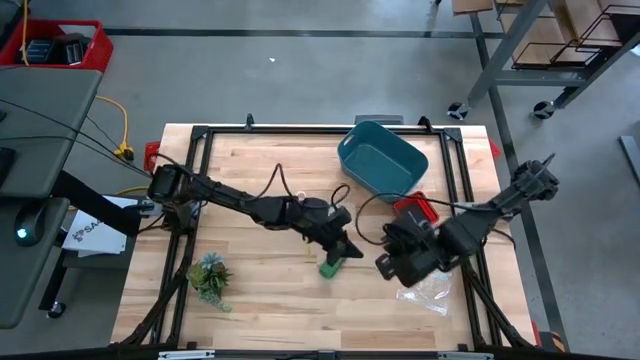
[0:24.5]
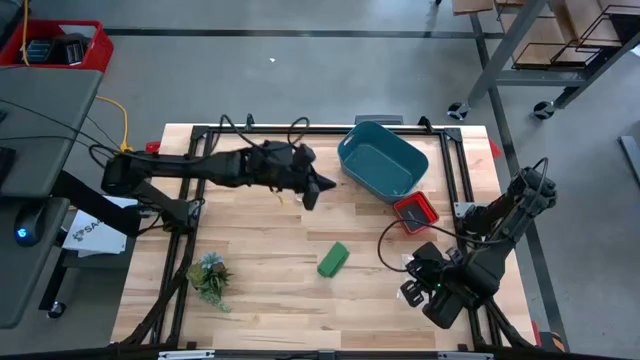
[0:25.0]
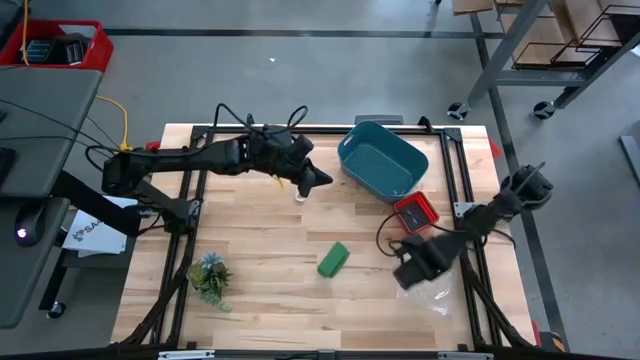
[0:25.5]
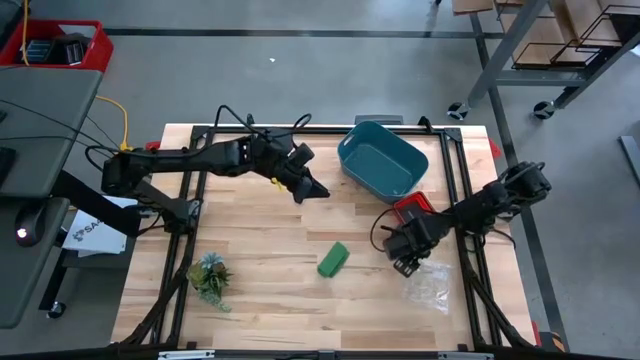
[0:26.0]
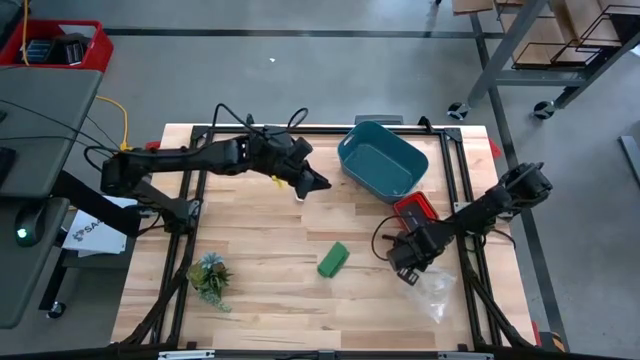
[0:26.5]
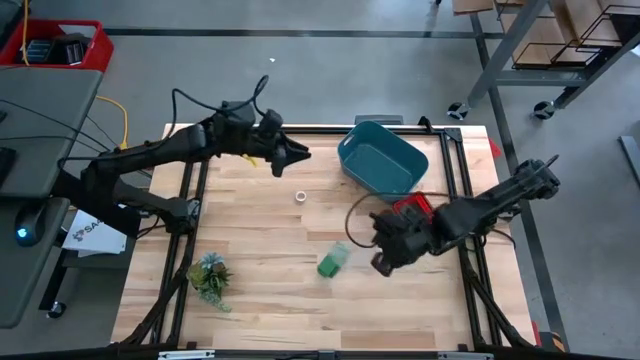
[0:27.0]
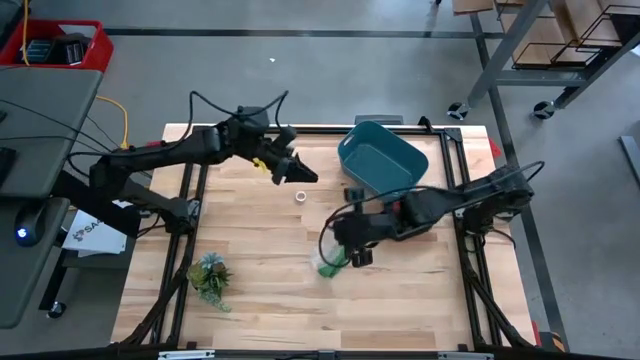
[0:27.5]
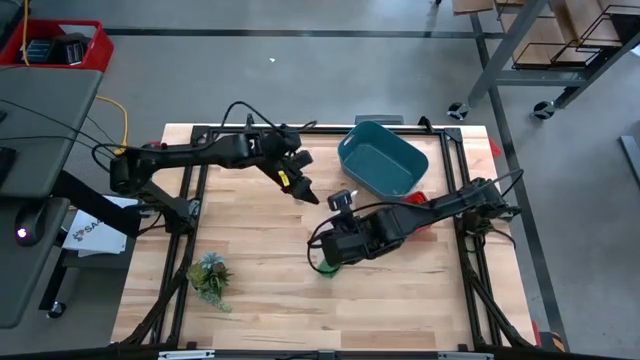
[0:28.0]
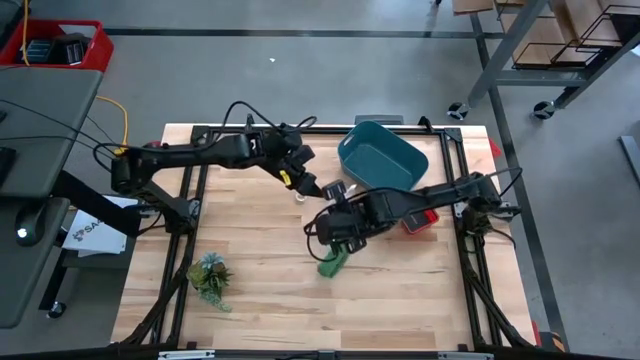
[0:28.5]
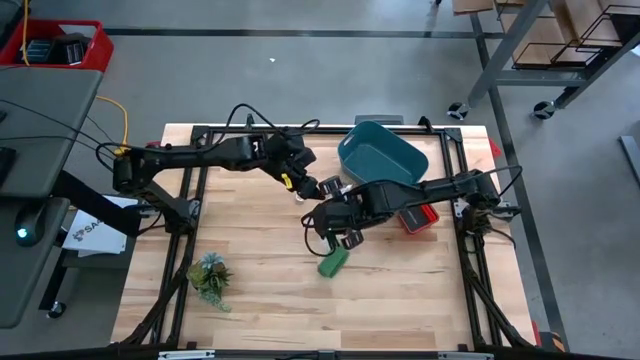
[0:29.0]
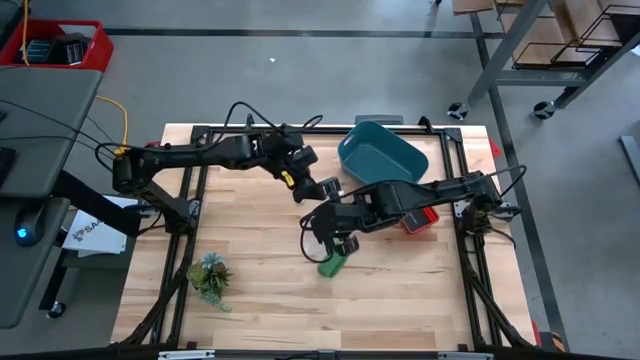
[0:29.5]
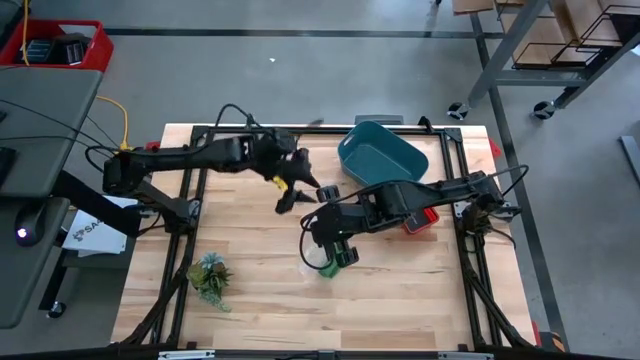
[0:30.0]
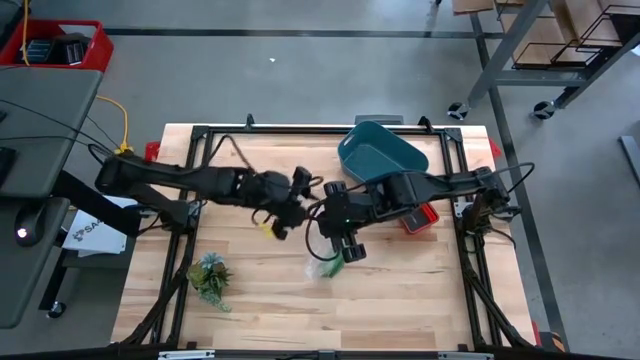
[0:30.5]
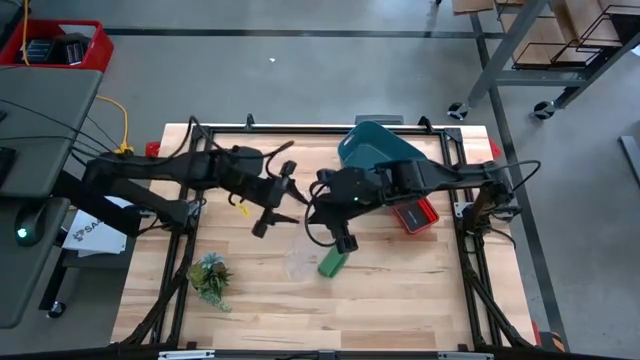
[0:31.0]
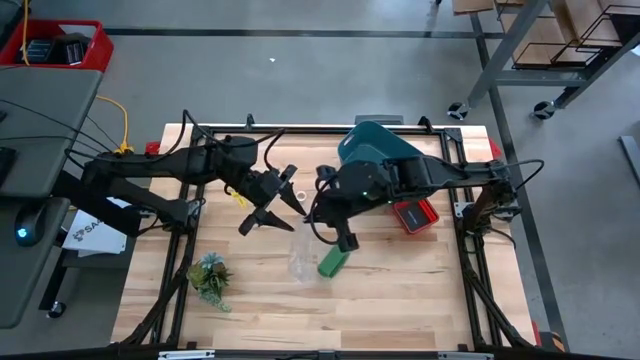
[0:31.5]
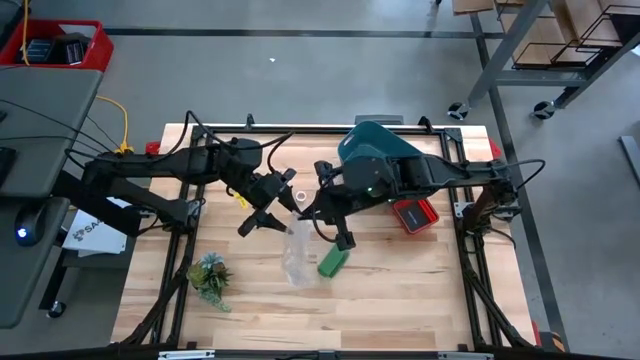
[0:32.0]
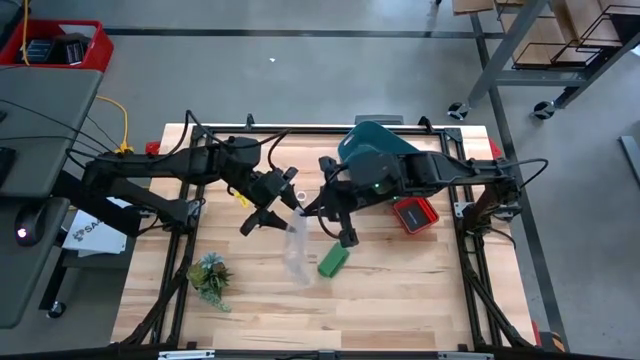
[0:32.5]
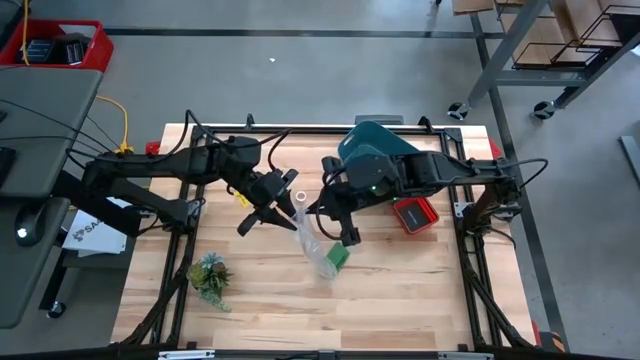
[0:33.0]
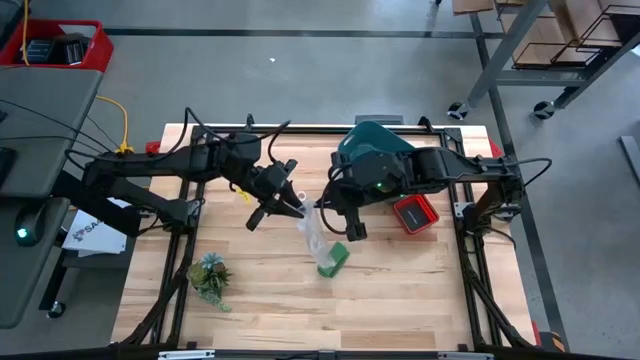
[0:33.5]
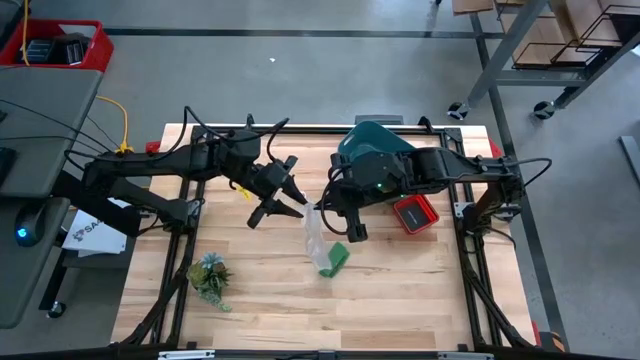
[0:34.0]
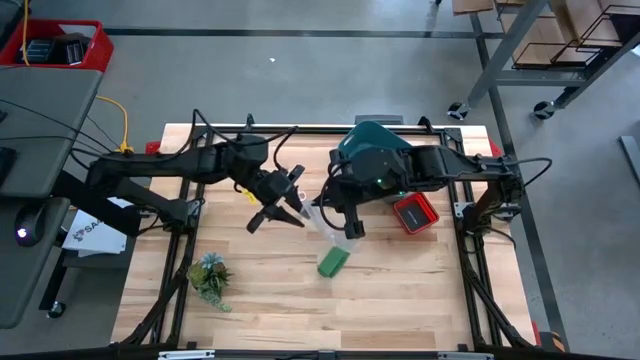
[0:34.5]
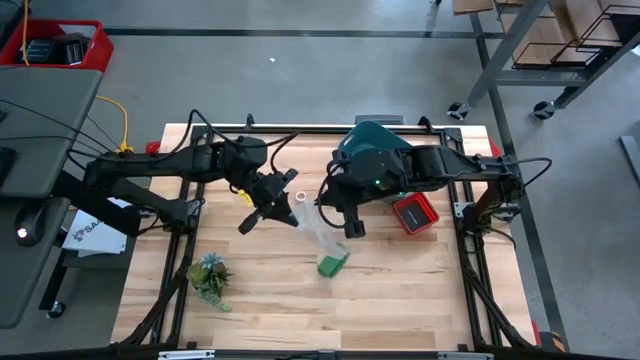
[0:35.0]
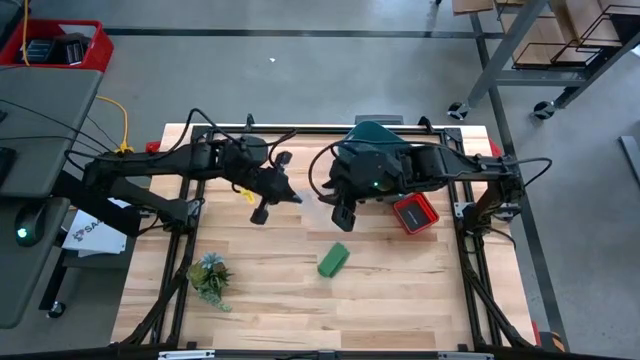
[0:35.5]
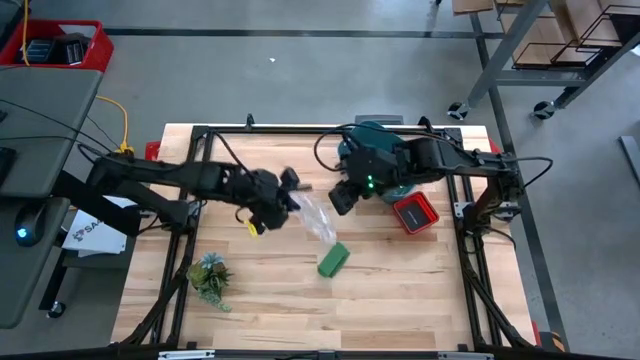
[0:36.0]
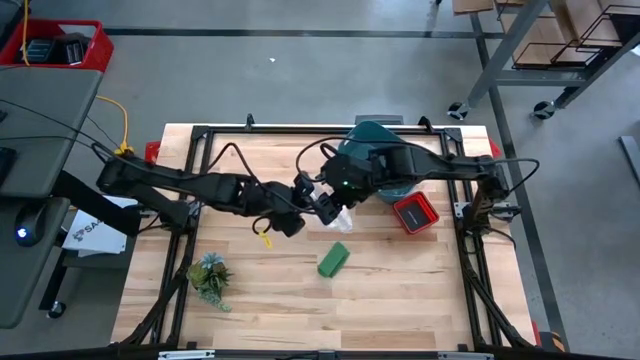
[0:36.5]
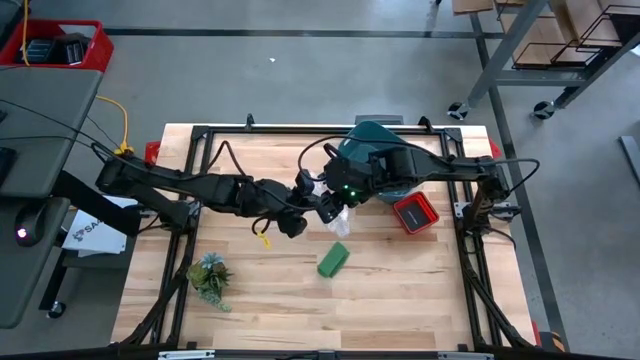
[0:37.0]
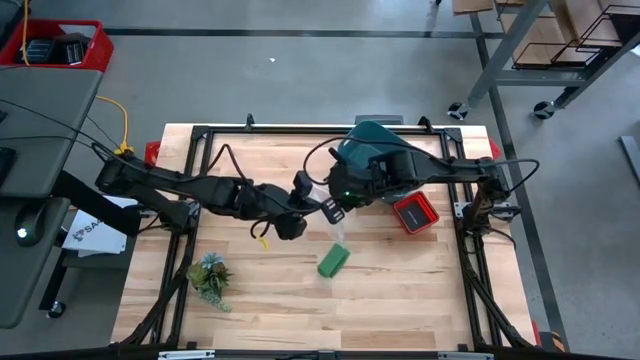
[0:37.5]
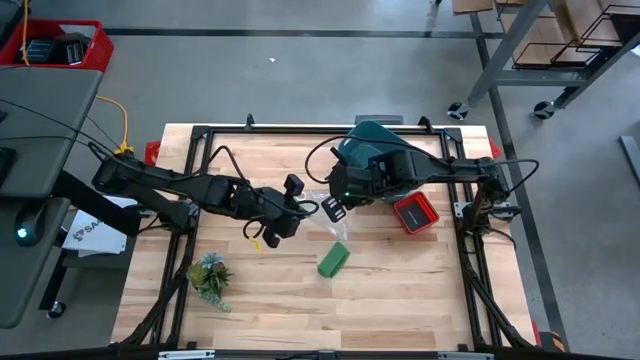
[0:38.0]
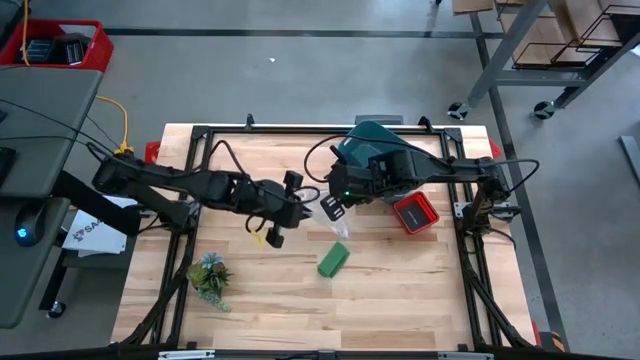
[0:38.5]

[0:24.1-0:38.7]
Task: Roll bandage
Prepare the transparent zip bag

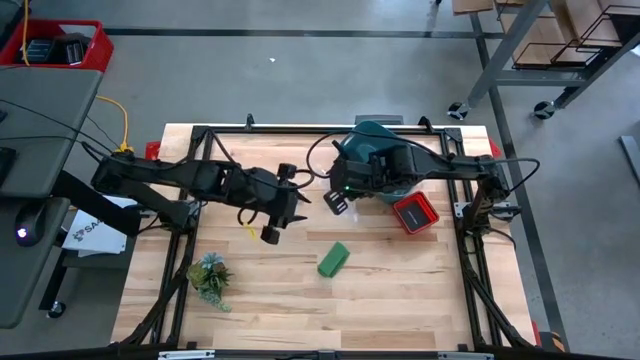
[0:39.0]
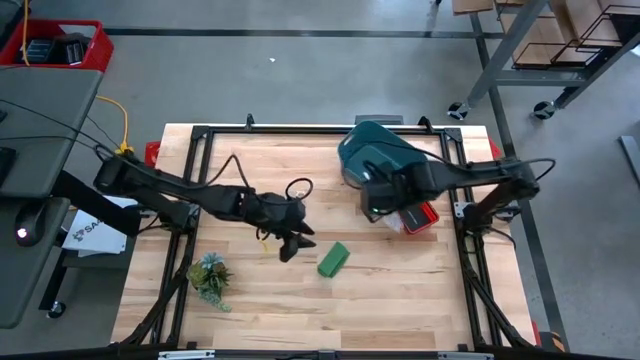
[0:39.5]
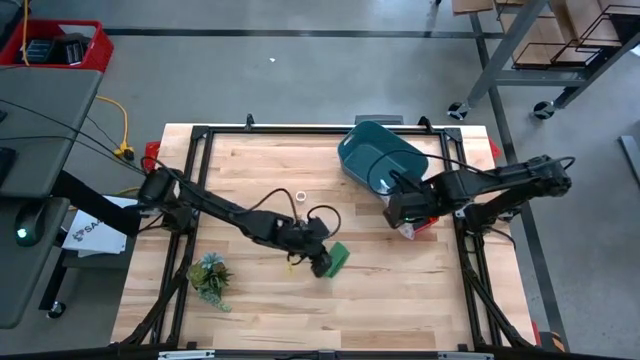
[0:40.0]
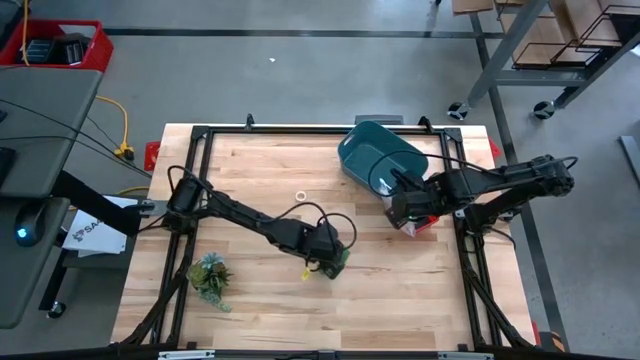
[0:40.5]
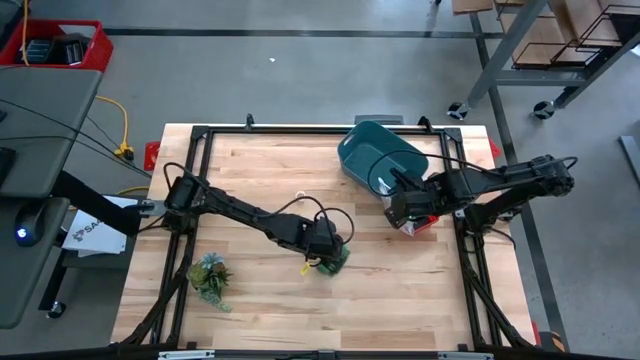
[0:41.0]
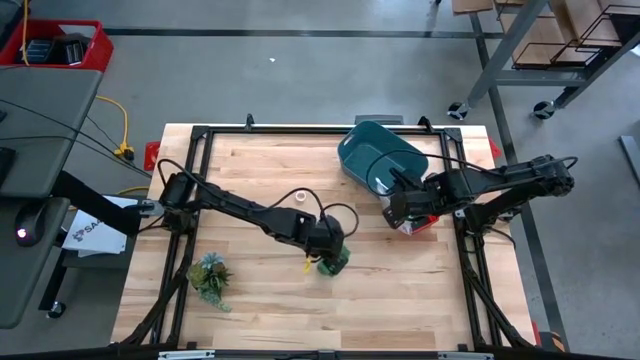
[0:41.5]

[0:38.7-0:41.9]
Put the green bandage into the transparent zip bag

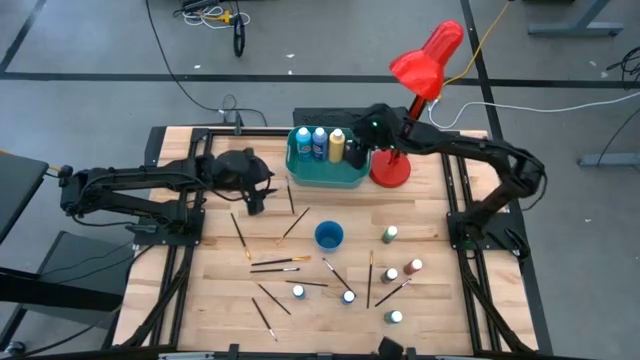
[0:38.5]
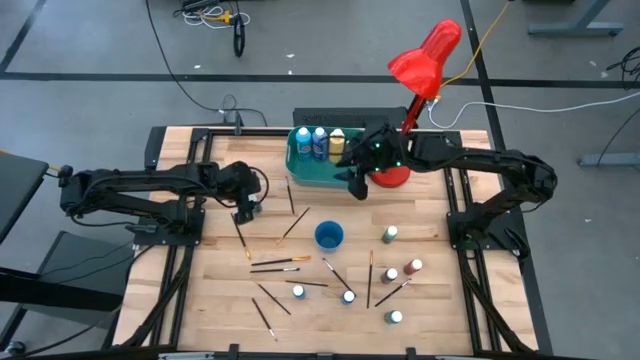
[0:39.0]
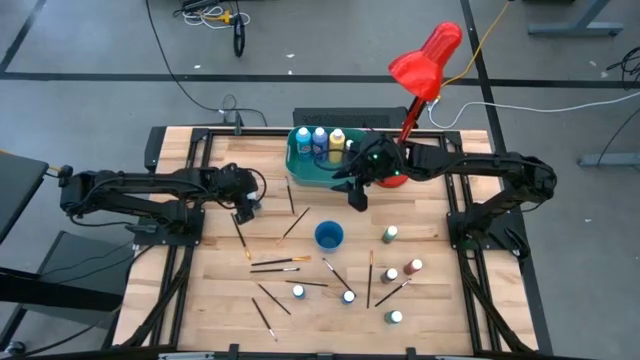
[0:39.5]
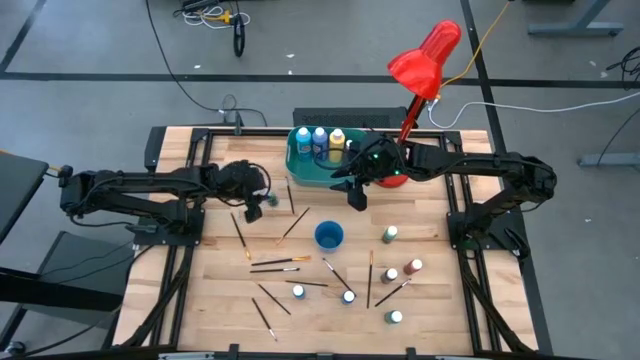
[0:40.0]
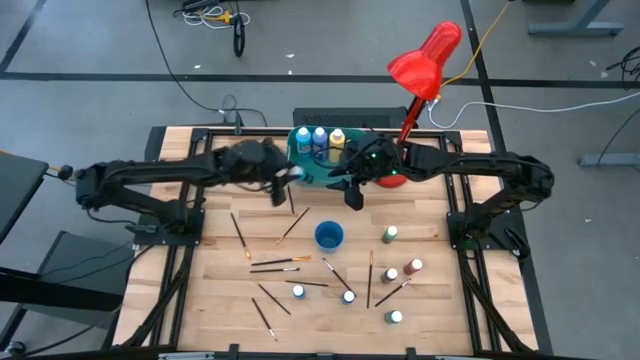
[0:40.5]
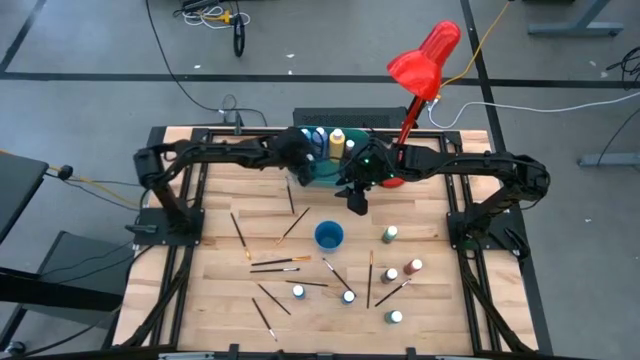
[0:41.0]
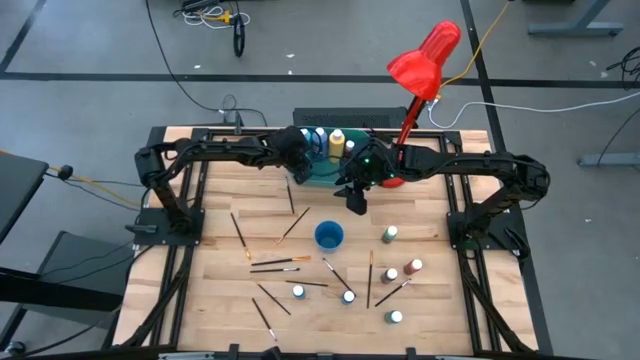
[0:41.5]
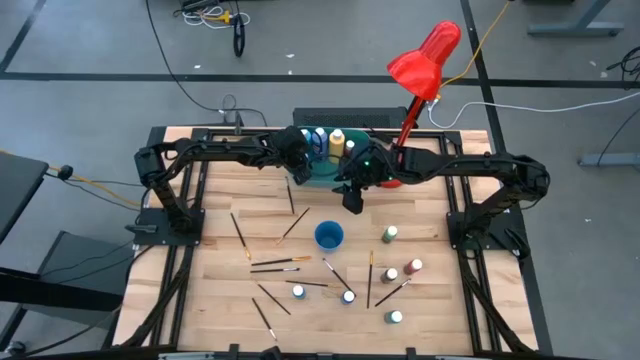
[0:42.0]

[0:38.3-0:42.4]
Task: Pick & Place Paint Supplies
Put the light blue paint bottle into the green bin
